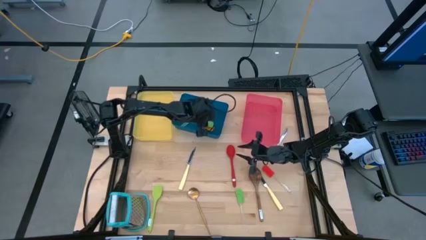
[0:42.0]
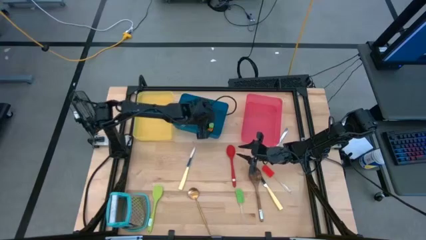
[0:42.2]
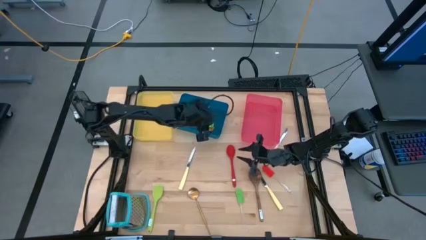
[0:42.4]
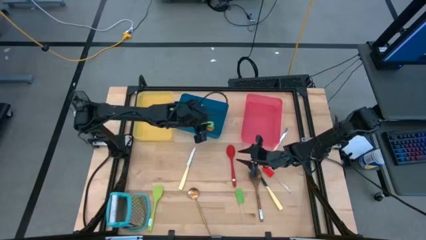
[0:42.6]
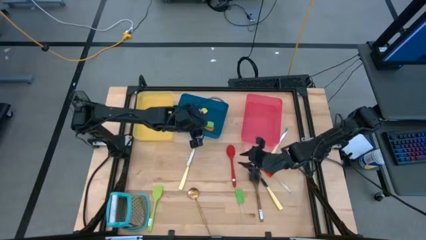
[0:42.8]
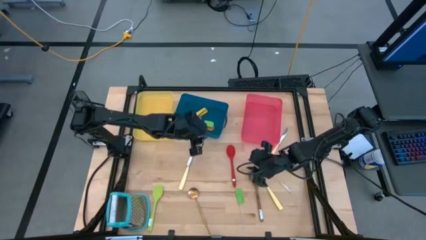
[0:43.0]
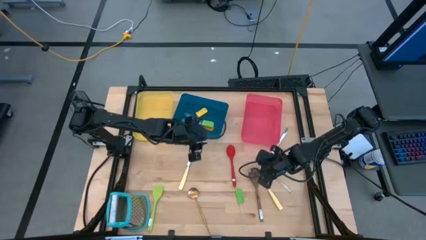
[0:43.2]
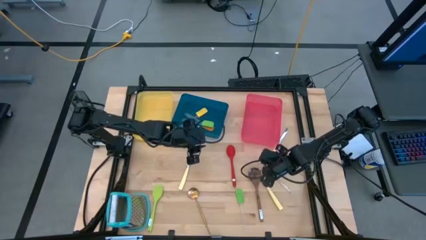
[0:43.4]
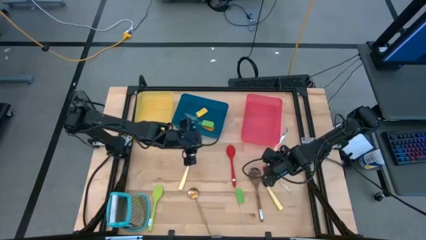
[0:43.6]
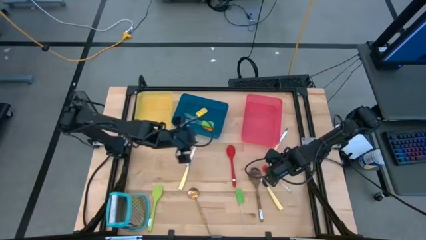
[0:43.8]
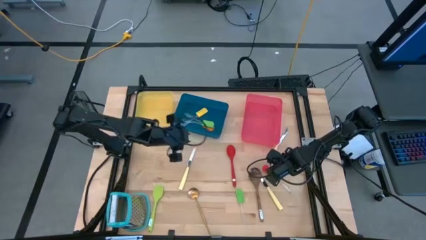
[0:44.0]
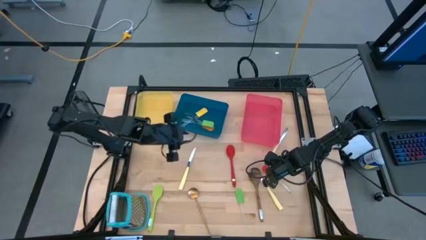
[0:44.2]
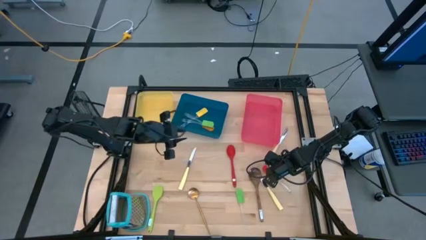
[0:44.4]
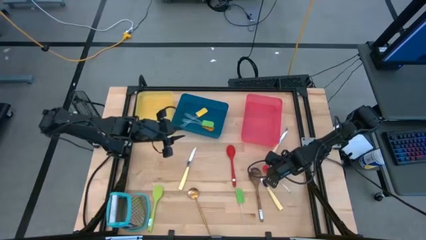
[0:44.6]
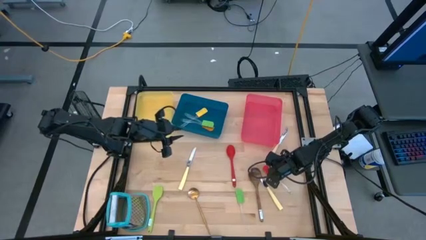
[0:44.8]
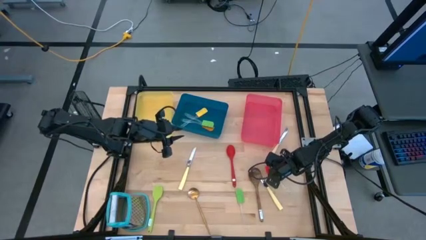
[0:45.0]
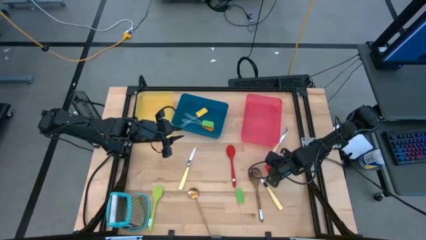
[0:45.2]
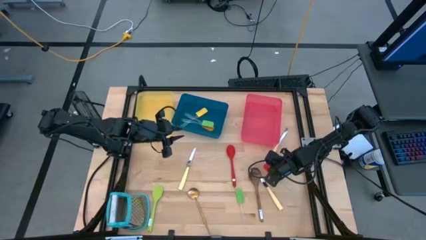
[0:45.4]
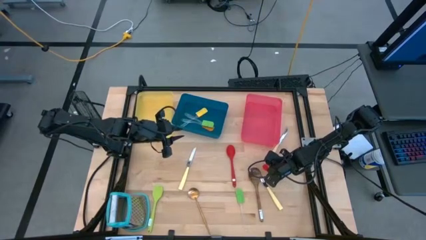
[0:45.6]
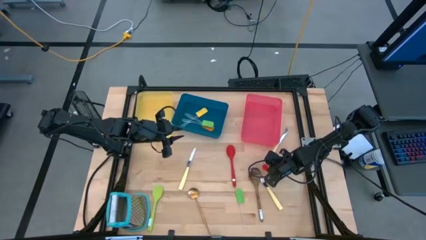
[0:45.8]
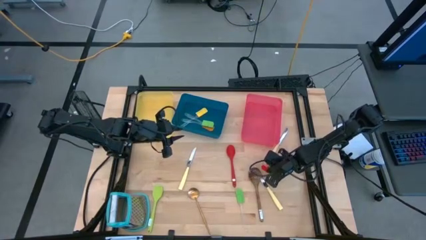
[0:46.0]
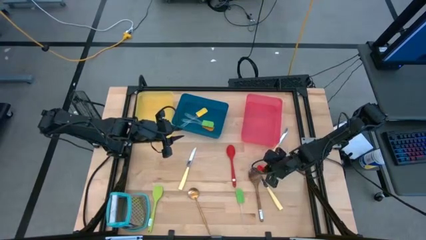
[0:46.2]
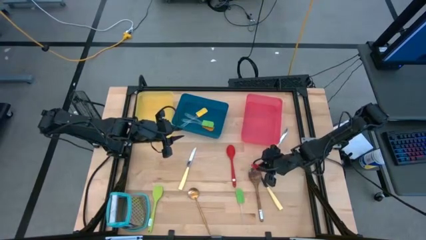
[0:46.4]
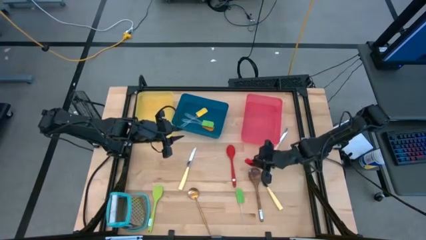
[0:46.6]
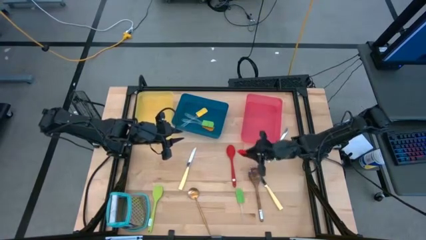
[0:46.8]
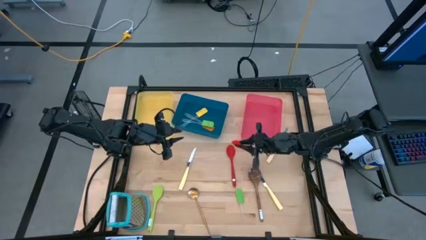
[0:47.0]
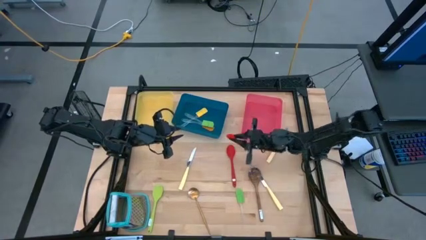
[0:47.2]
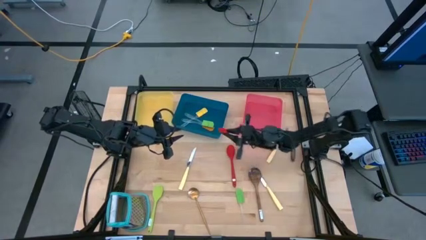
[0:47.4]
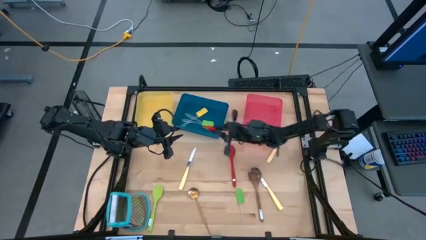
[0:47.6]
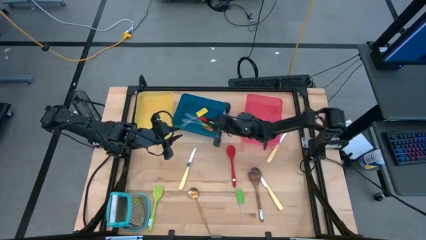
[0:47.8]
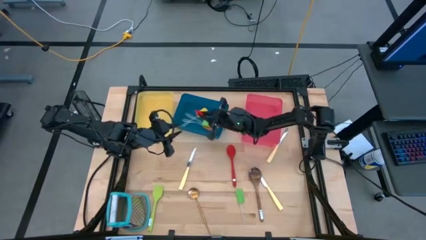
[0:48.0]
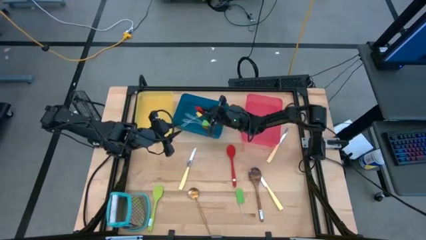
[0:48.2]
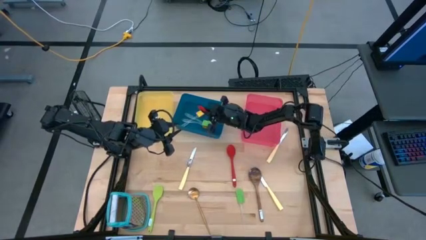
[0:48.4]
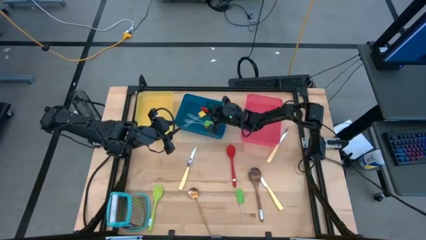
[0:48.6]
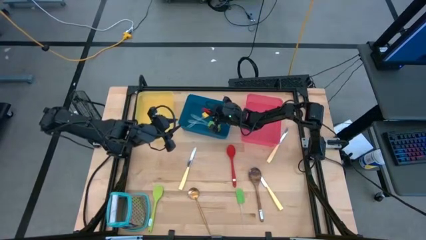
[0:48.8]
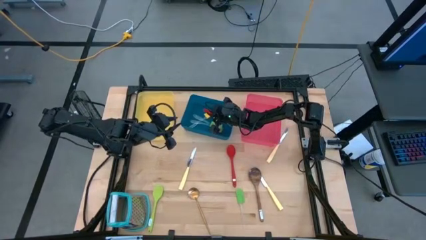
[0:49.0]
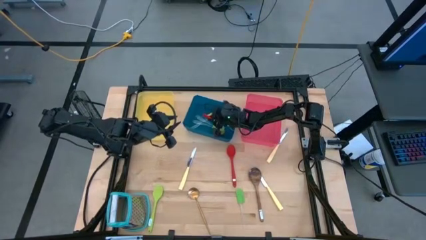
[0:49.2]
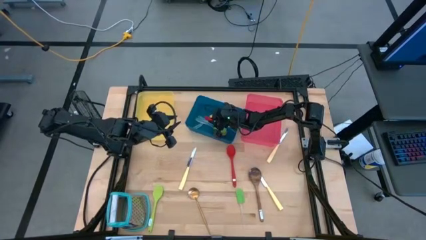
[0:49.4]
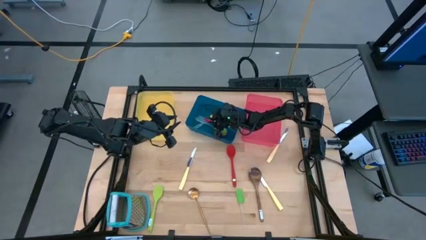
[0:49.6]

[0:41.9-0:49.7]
Task: Pick & Place Kitchen Items
Put the red spatula into the blue bin

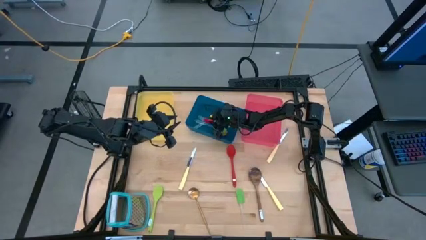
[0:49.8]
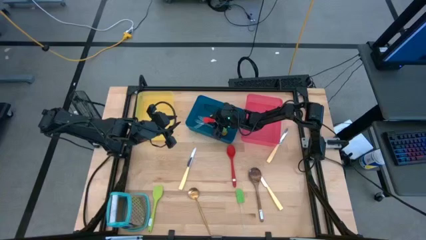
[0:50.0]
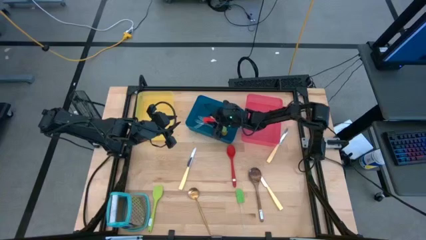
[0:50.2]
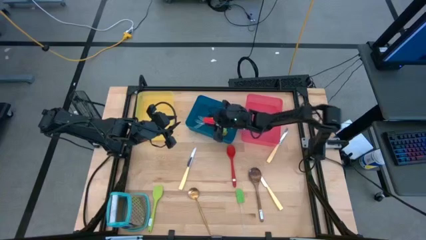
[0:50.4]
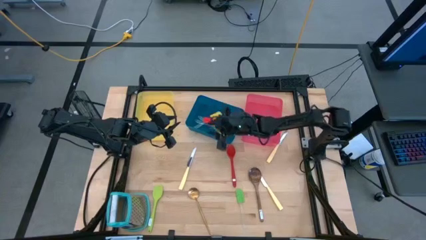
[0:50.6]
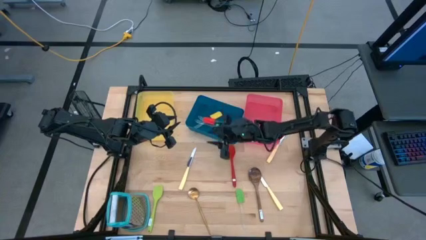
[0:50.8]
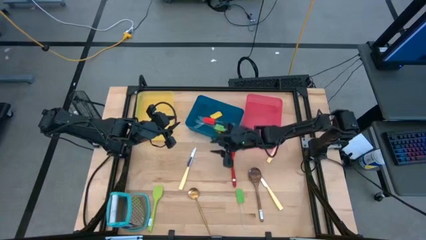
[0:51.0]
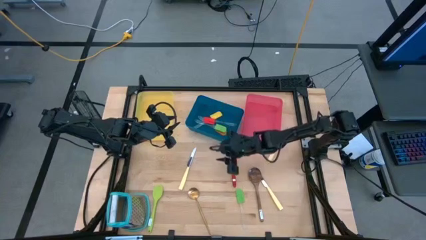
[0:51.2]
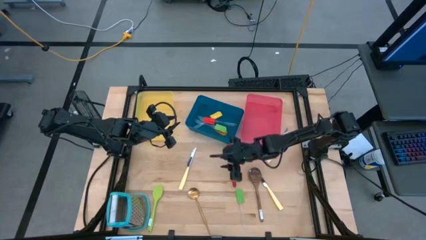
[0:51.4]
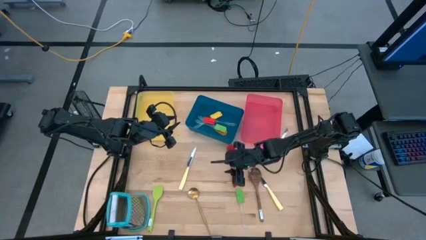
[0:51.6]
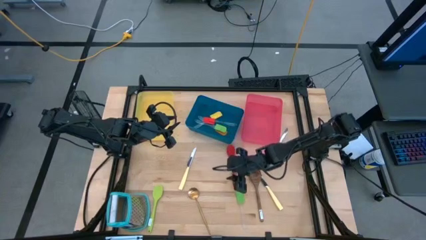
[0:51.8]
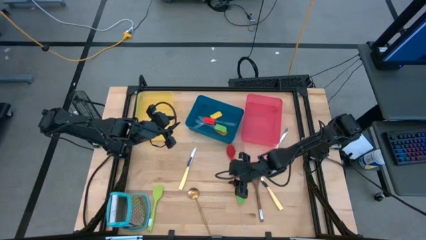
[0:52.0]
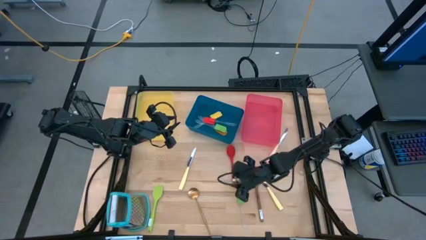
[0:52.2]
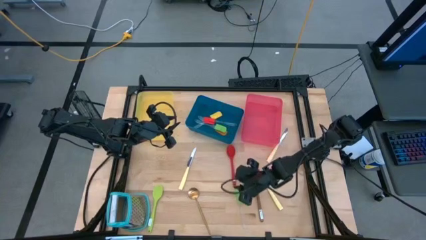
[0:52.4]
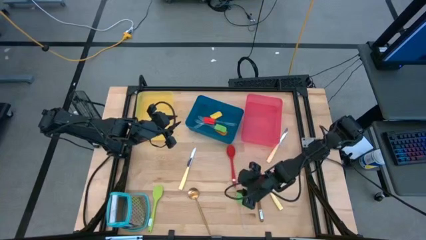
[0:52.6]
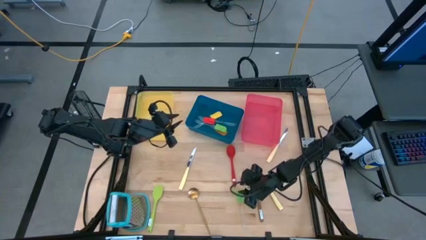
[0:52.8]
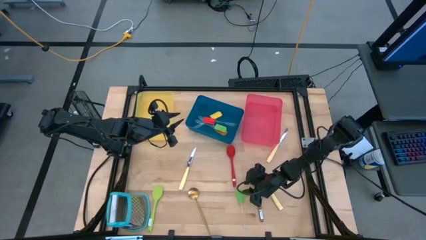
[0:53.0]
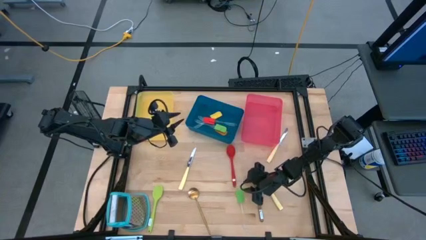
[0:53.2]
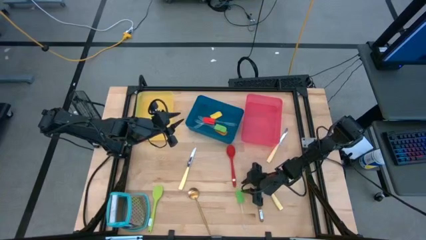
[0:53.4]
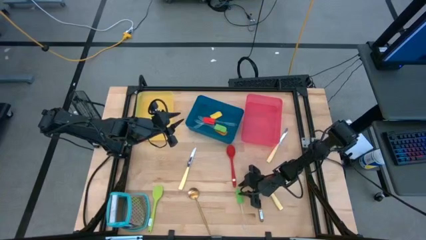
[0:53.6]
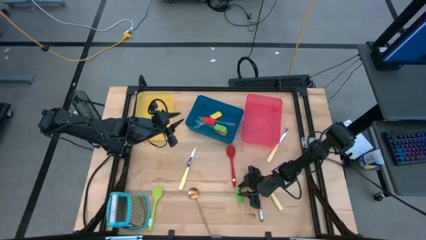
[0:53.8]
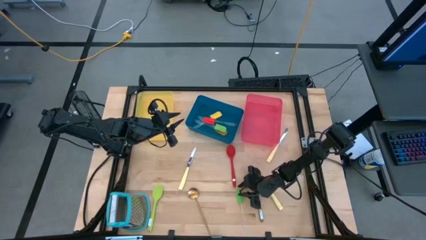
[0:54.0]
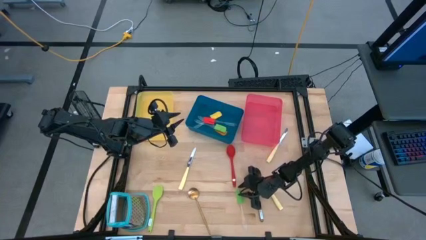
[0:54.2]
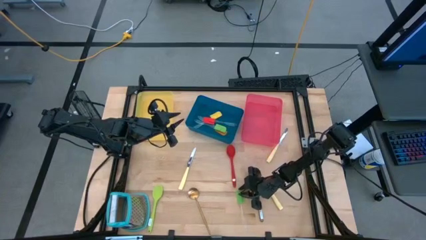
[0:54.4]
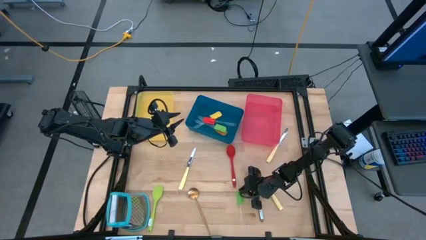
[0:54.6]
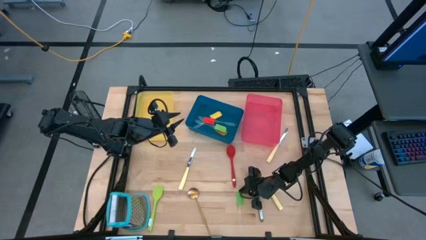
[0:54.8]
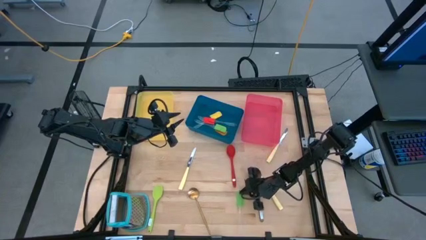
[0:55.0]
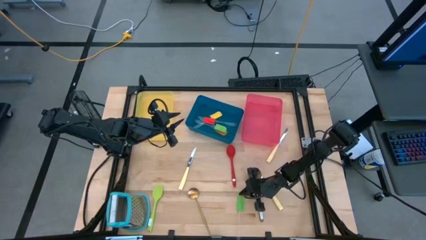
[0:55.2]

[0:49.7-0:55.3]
Put the green spatula into the blue bin

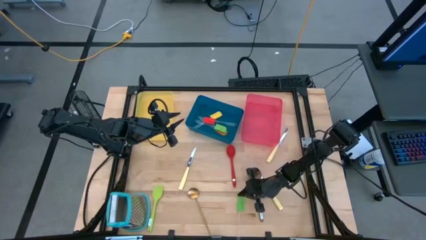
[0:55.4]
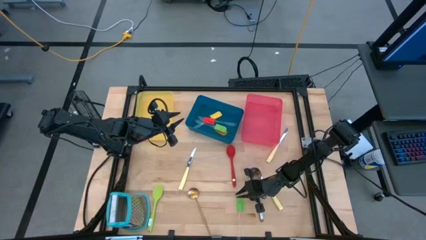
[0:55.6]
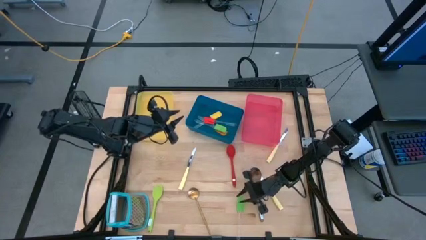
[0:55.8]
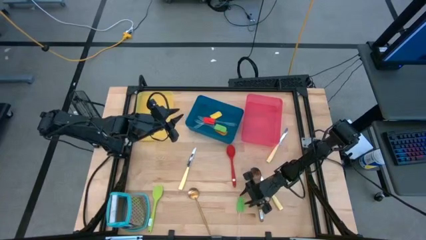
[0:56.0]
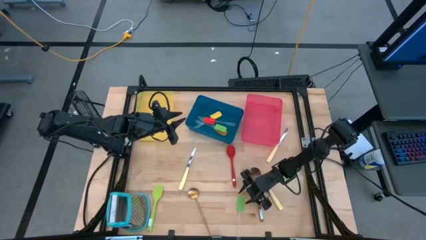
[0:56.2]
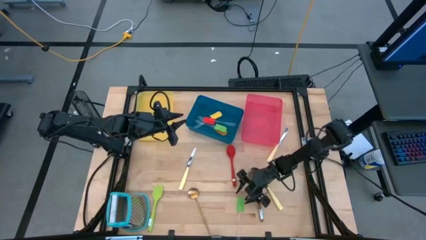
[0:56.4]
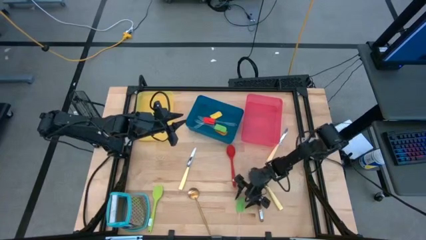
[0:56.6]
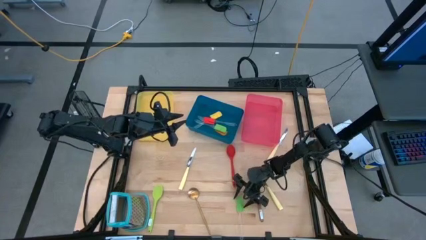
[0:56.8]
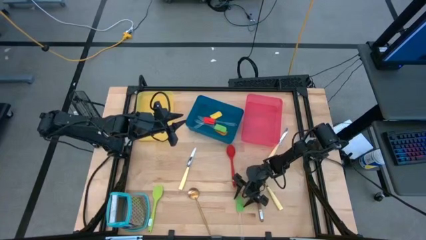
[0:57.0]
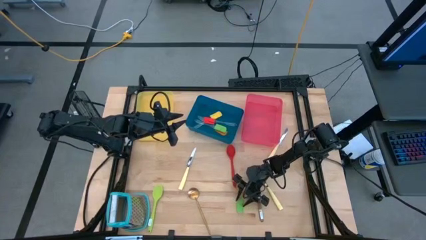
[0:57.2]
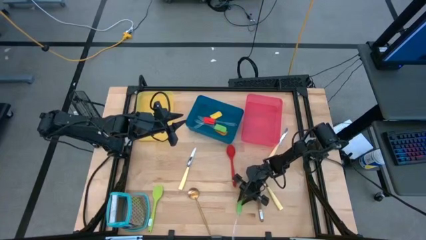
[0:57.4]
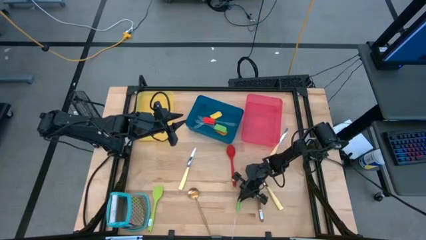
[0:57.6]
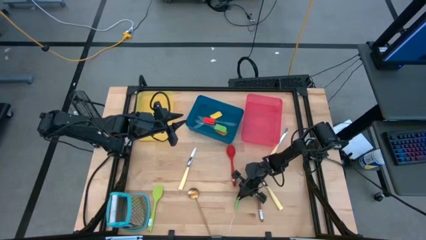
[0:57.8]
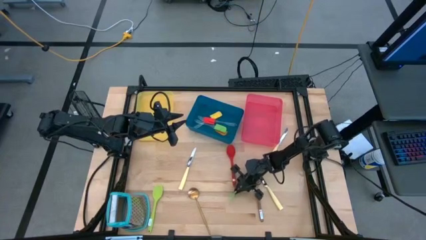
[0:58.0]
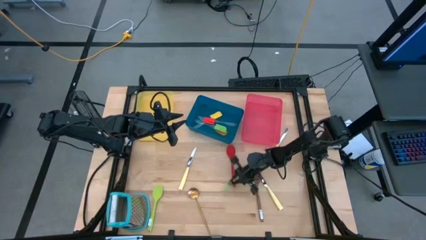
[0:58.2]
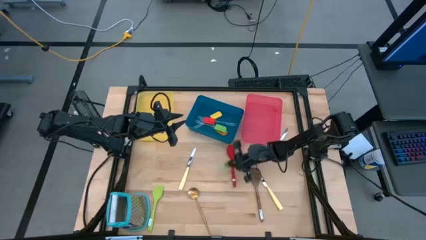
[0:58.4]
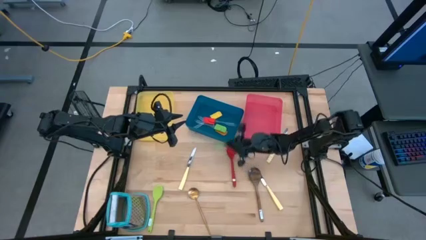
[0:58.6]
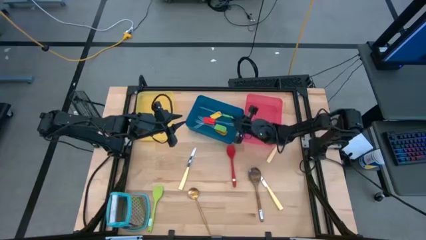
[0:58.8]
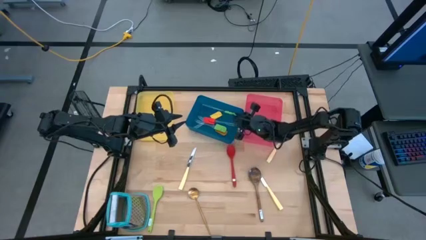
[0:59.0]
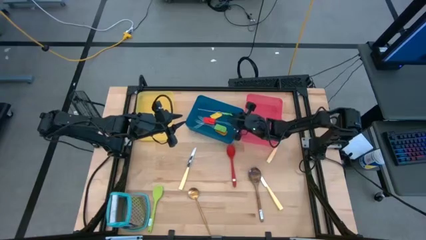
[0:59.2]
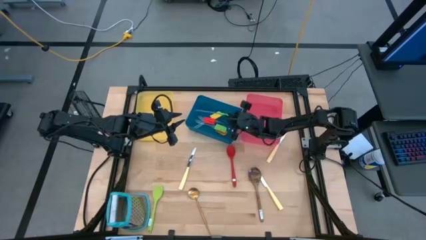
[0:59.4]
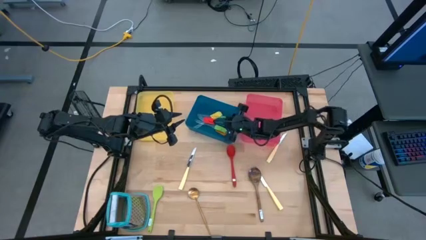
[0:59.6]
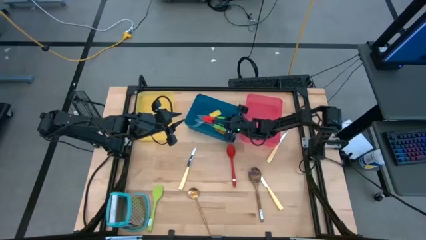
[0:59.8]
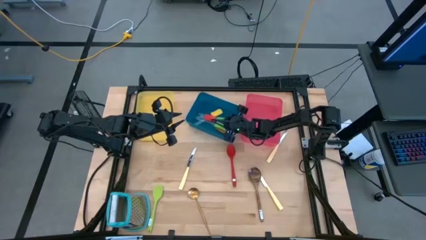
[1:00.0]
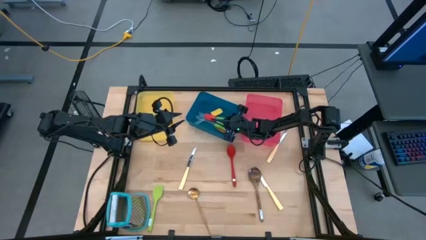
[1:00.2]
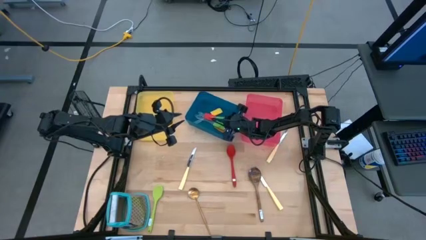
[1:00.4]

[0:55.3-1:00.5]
Put the green spatula into the blue bin
